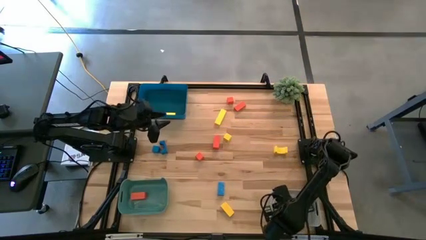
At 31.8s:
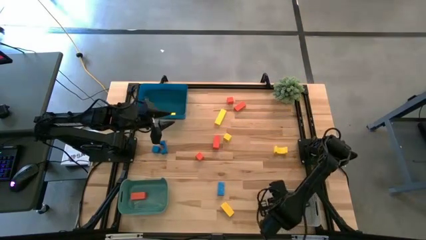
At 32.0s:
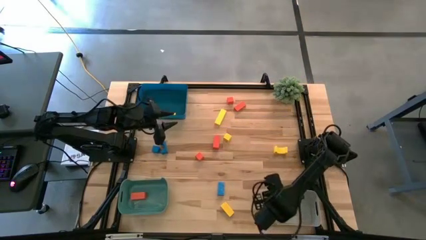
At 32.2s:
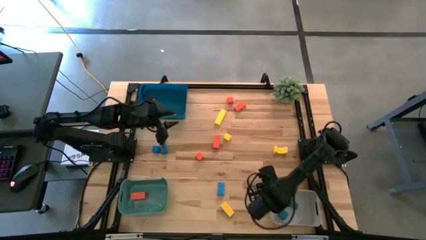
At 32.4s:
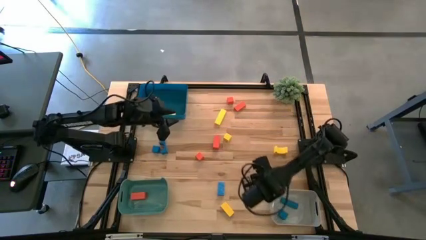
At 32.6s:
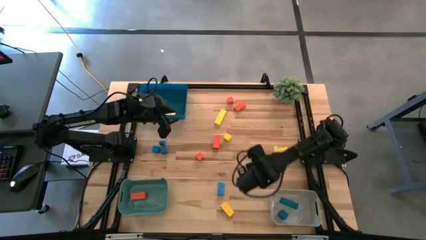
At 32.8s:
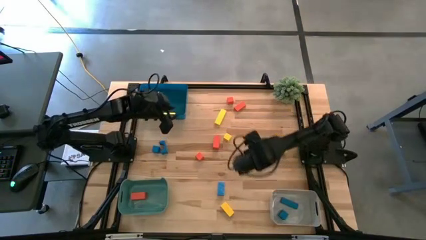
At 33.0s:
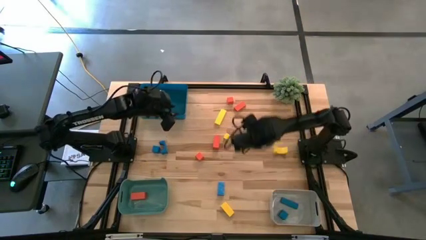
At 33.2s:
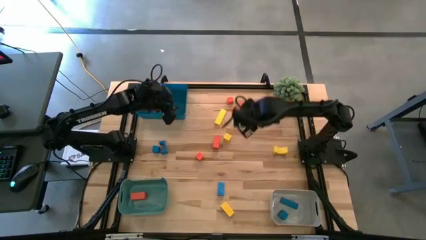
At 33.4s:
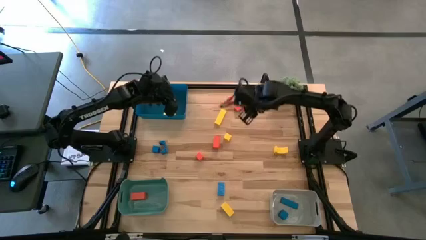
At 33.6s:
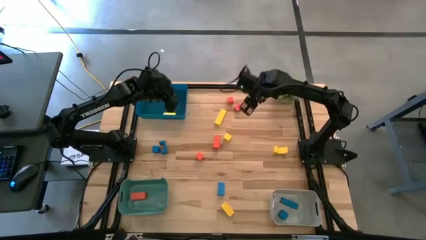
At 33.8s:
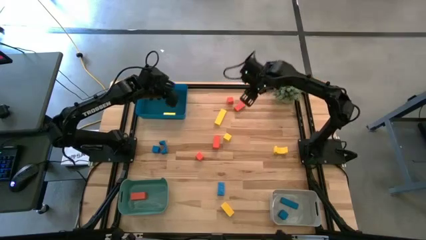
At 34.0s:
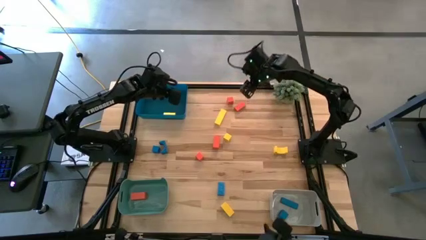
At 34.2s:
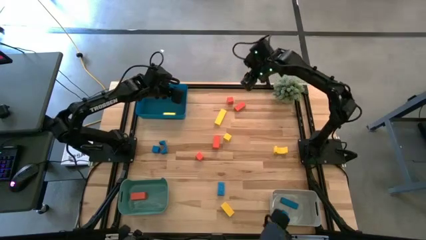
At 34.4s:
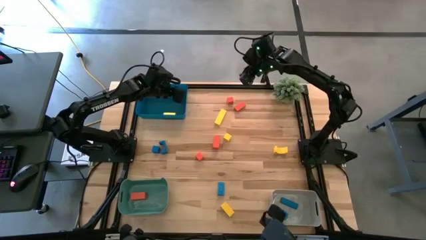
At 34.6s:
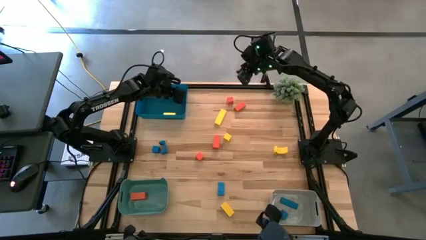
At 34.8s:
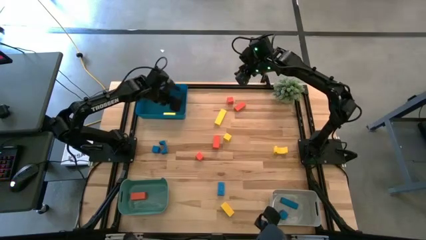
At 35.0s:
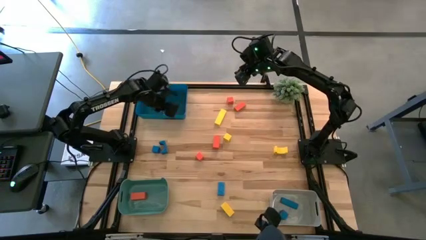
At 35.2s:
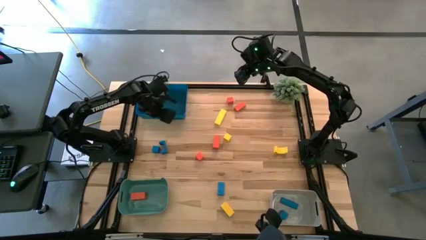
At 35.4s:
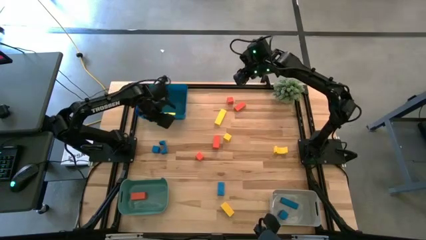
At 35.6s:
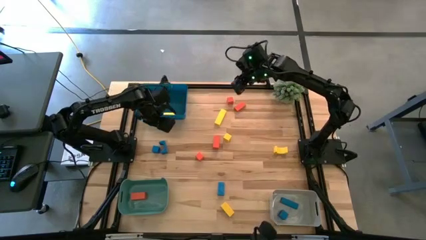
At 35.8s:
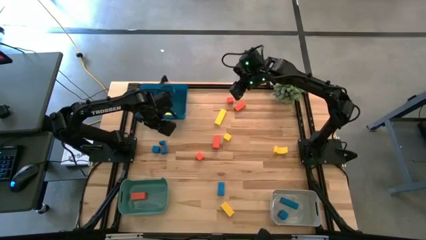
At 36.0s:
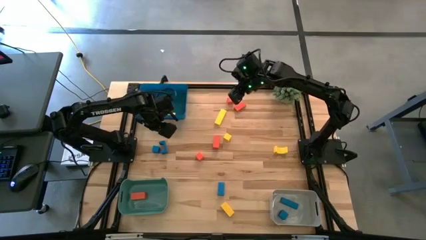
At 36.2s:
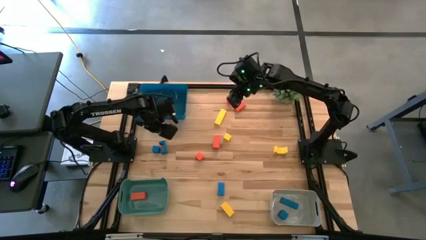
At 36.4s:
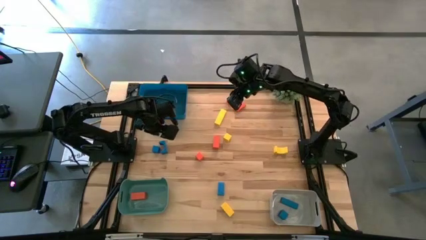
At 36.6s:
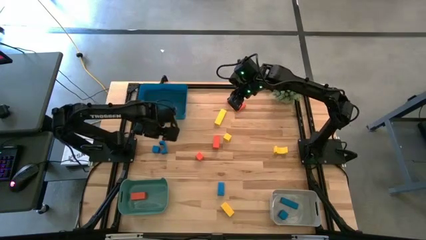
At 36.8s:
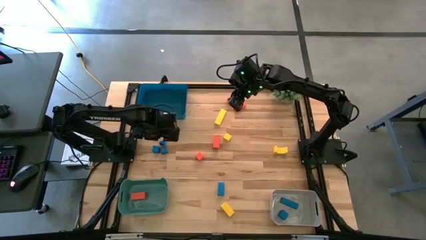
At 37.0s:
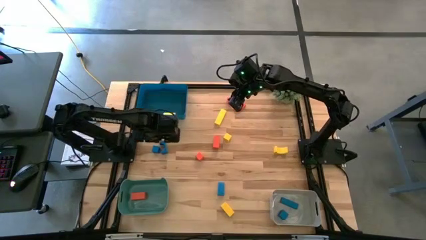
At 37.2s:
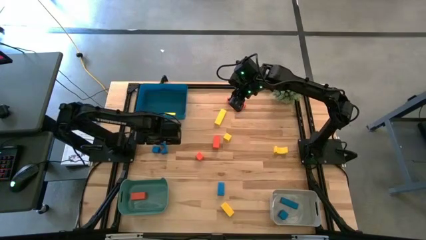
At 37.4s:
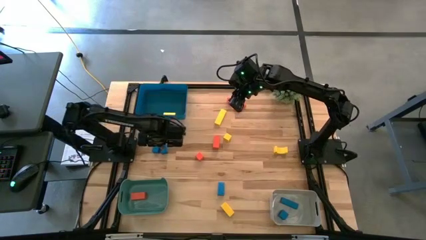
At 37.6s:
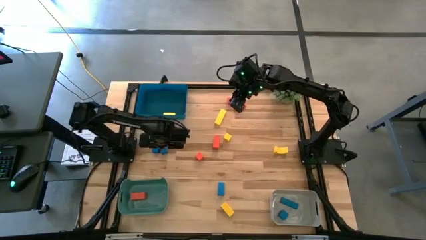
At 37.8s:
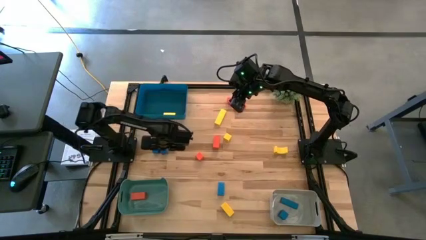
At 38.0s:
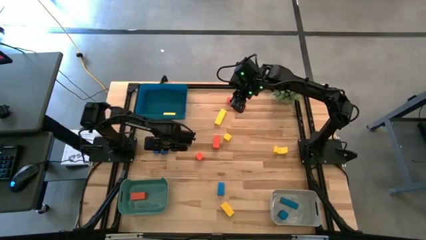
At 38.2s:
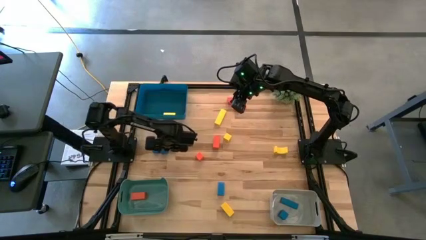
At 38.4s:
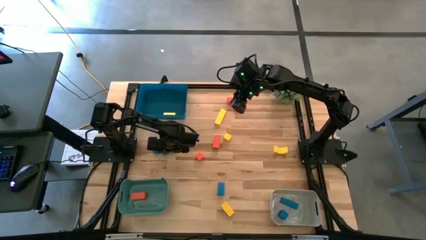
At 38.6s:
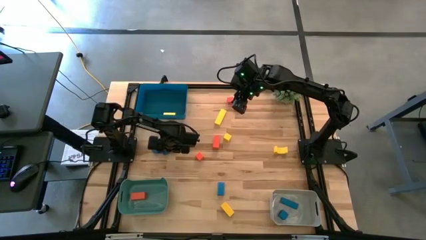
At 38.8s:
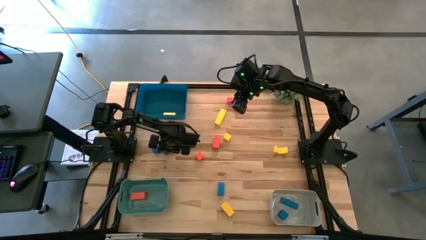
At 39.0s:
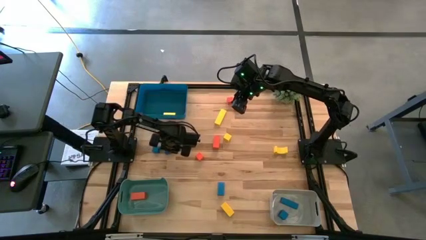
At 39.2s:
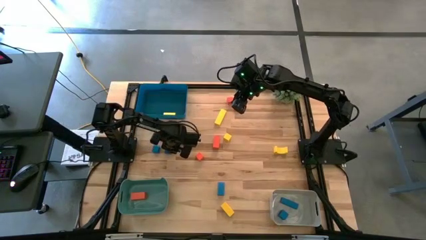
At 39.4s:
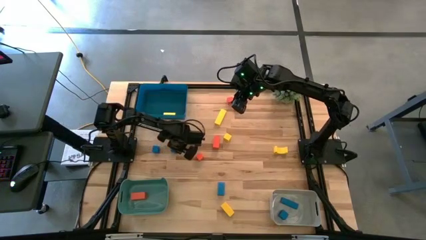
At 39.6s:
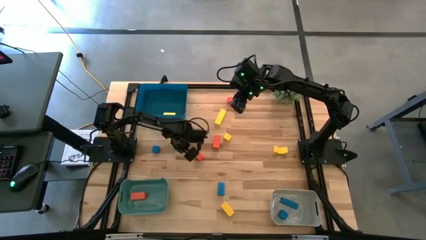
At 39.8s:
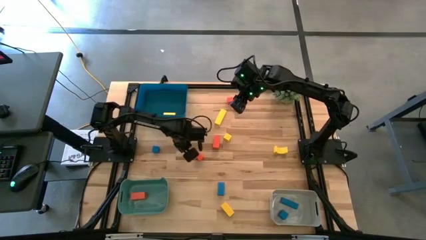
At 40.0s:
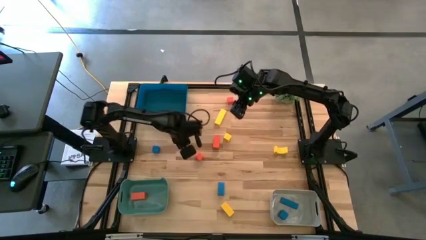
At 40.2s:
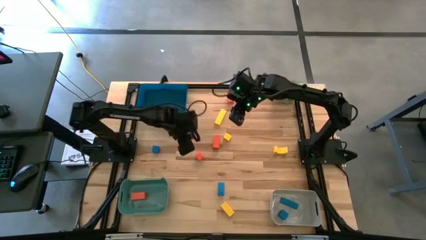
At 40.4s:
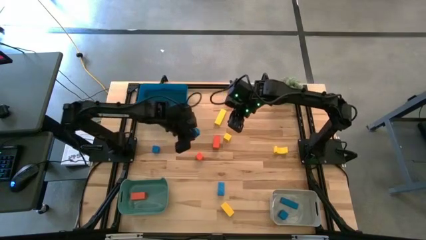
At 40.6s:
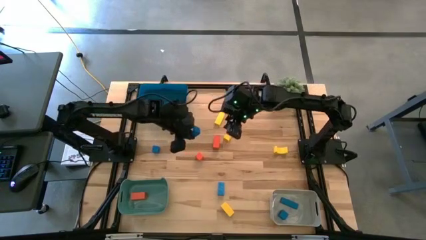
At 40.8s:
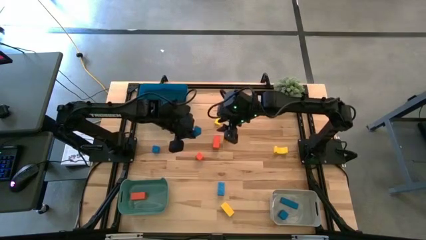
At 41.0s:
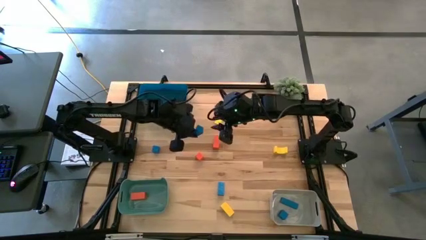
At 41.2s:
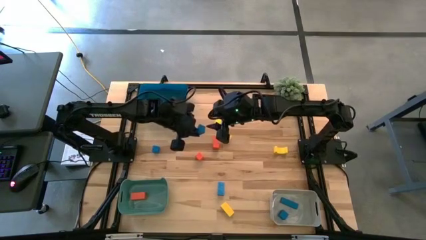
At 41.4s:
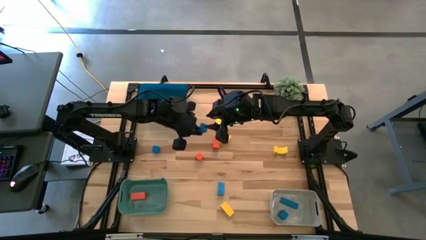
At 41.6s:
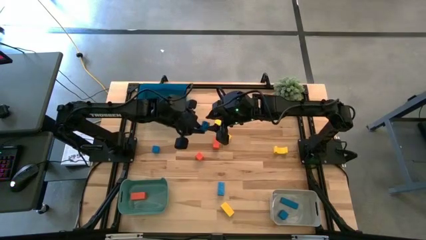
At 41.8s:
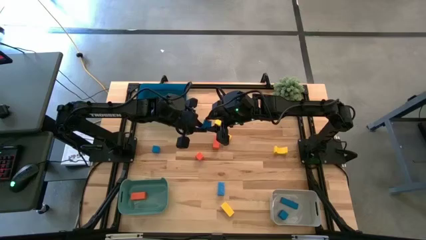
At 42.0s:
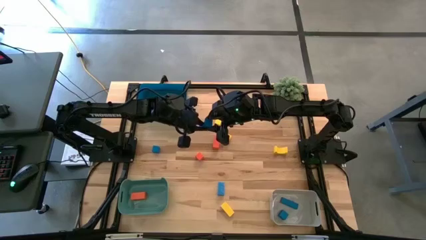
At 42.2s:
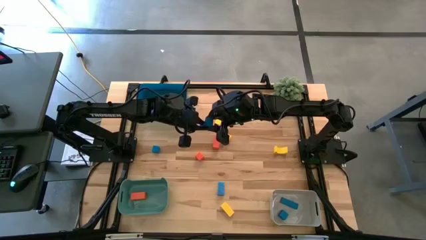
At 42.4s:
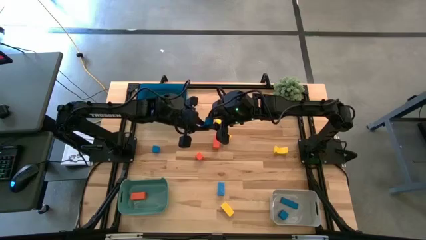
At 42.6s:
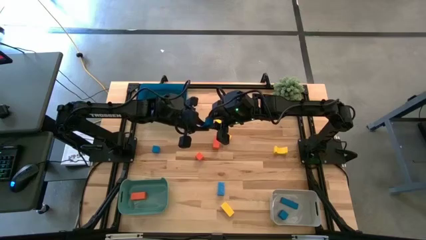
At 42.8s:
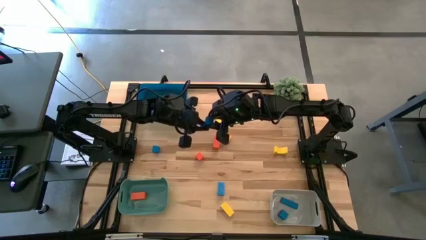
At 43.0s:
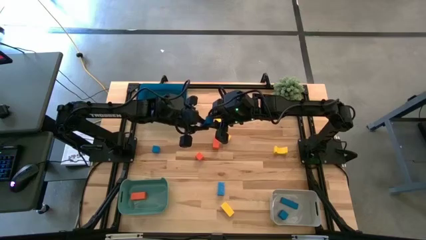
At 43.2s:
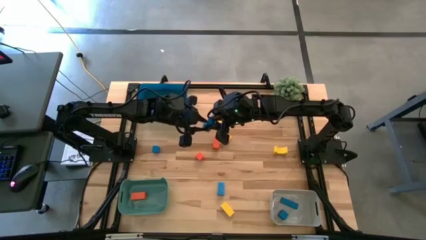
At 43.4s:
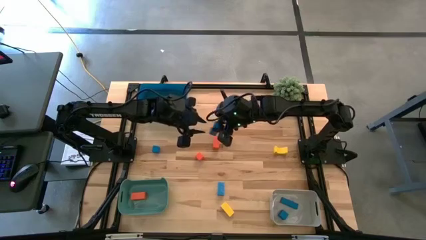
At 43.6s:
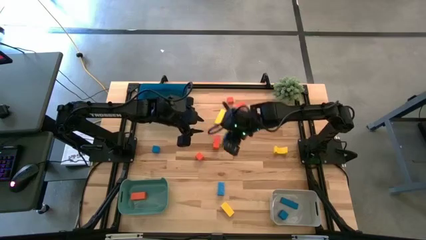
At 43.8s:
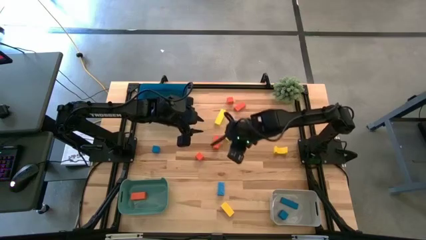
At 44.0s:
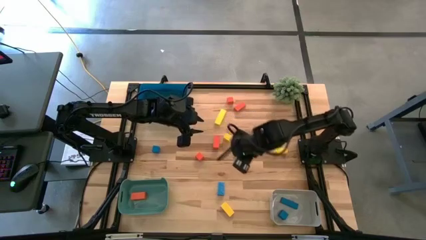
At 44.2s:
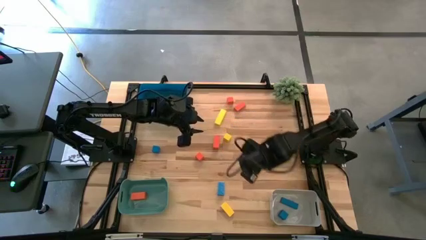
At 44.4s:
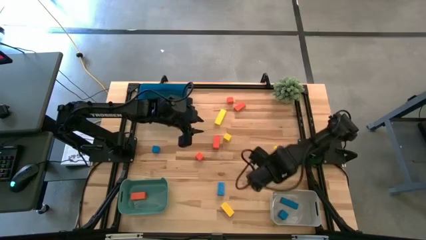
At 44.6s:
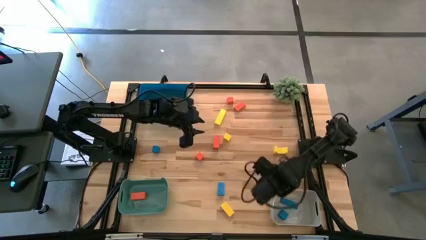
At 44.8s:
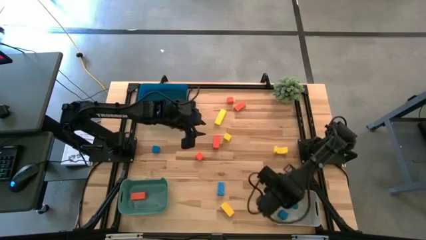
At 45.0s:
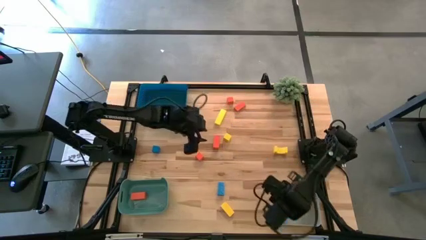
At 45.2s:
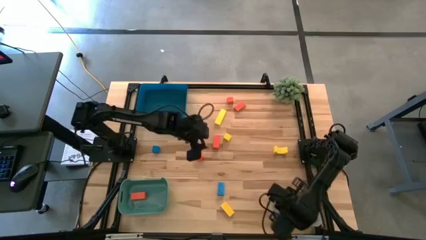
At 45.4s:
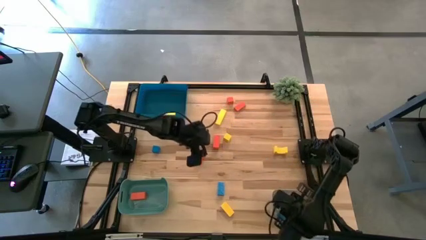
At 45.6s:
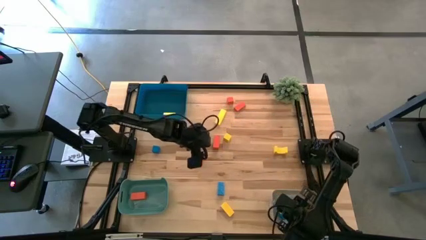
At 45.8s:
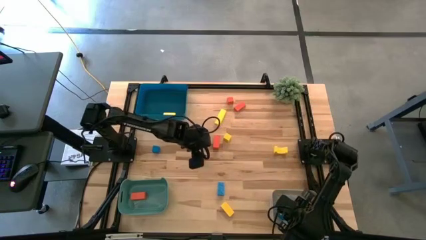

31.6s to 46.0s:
Task: Sort & place blocks by color
Put the top right blue block into the white bin

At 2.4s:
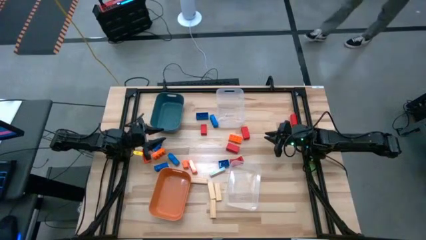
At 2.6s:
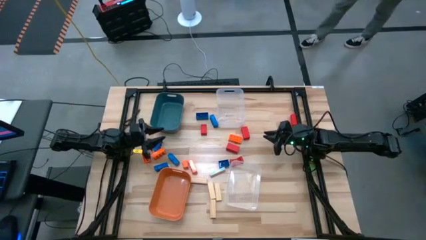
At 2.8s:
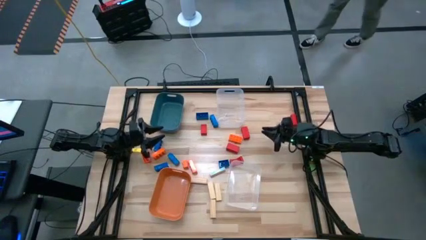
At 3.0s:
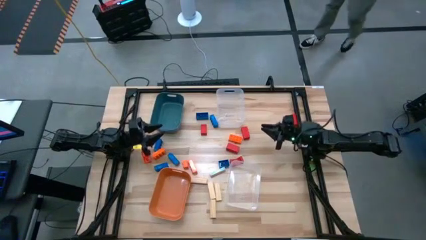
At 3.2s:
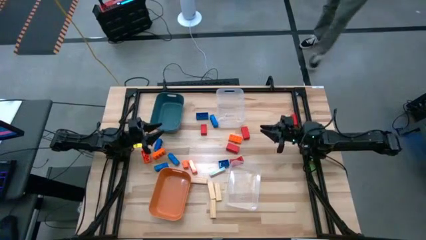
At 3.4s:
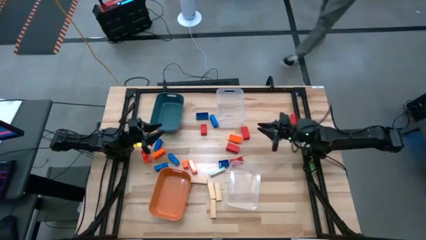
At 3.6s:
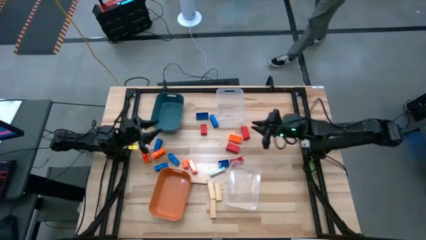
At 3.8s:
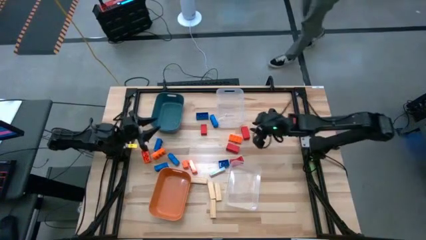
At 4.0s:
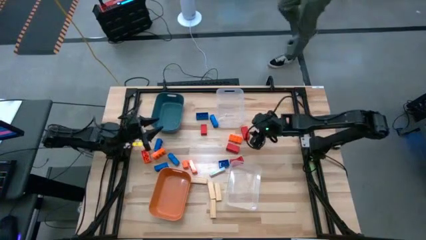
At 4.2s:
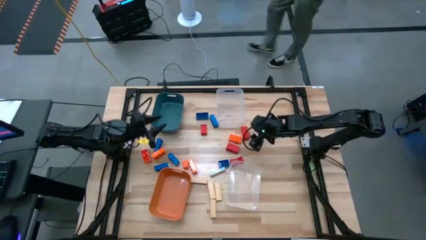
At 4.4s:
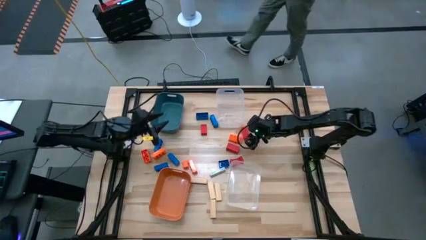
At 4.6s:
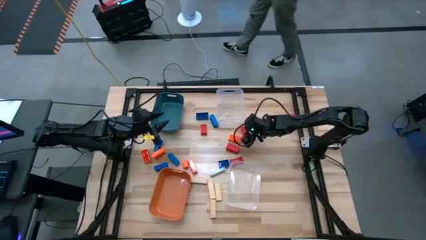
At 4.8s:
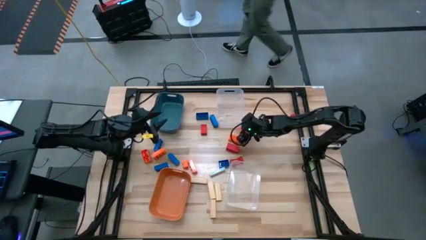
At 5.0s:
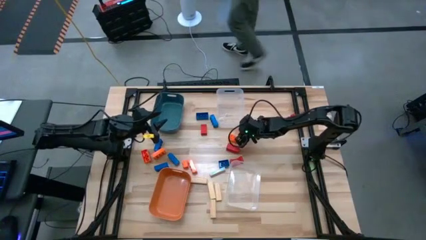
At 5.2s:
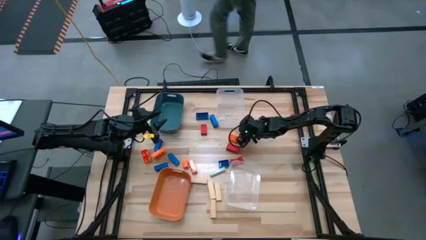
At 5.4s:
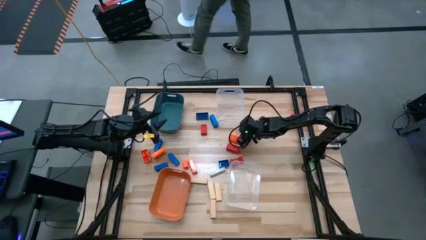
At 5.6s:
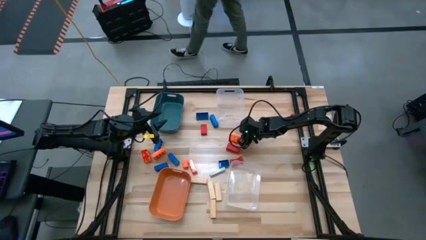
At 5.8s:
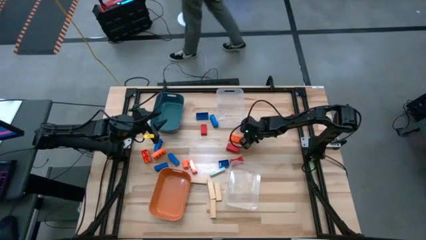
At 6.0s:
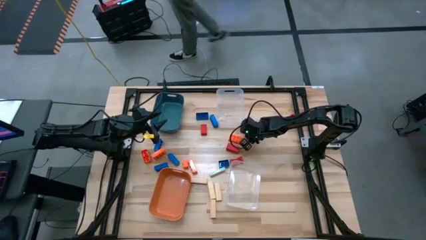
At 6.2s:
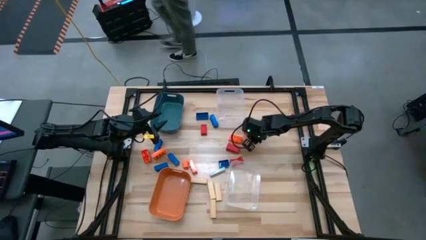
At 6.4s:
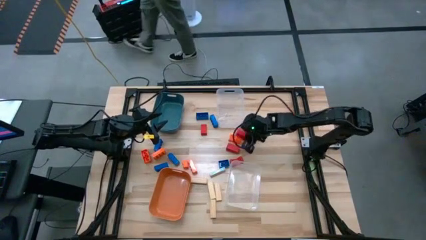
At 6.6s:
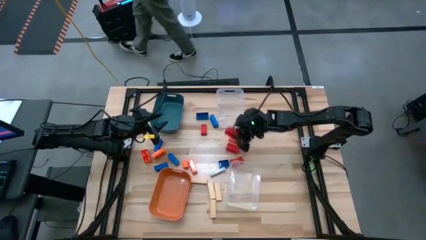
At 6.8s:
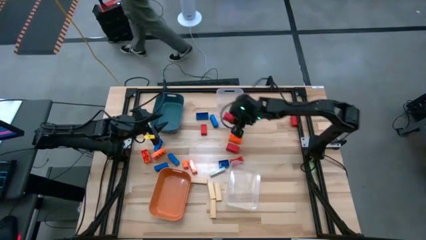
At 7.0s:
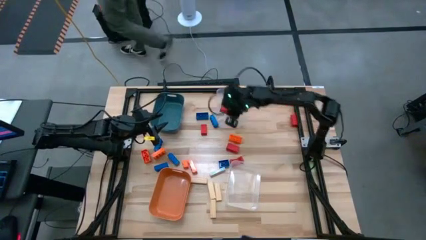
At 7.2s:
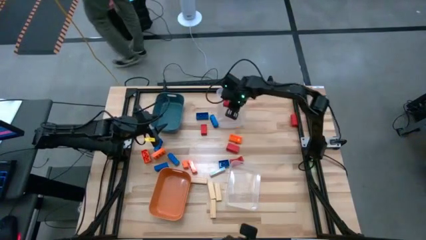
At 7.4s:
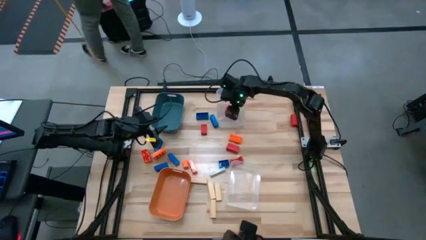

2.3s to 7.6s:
Task: Sort blocks
Put the red wooden block into the top transparent bin
